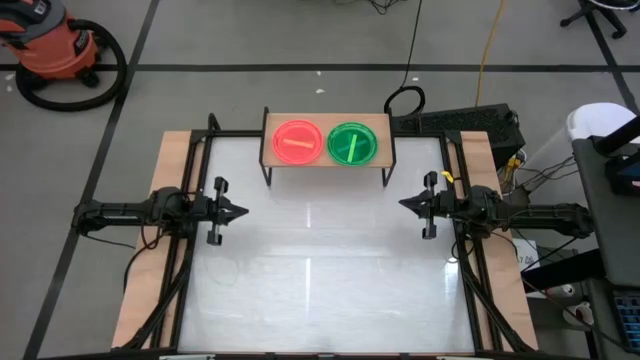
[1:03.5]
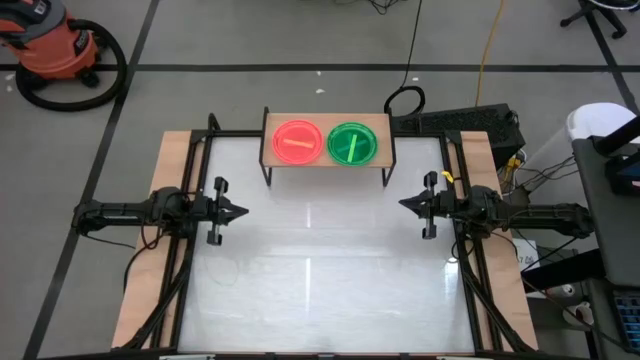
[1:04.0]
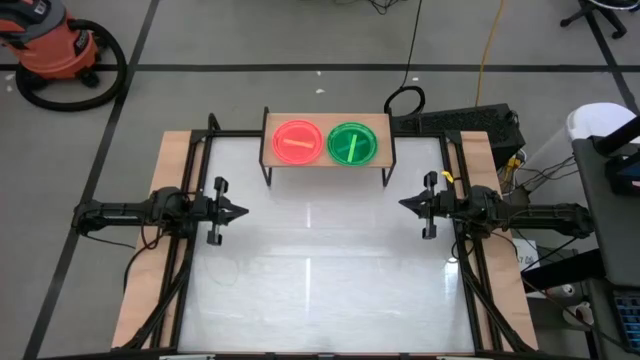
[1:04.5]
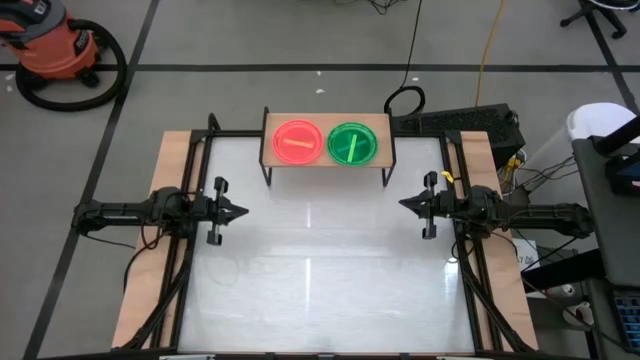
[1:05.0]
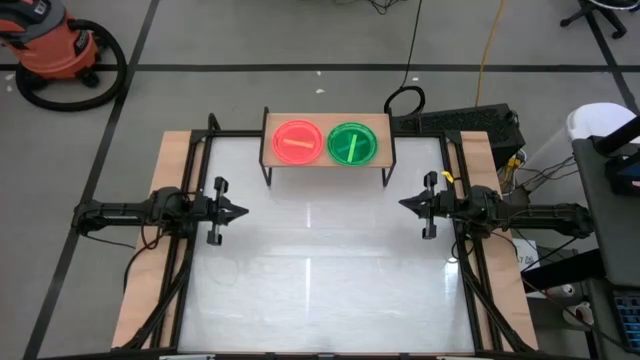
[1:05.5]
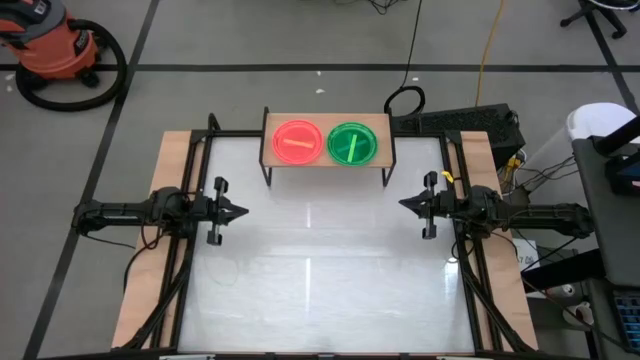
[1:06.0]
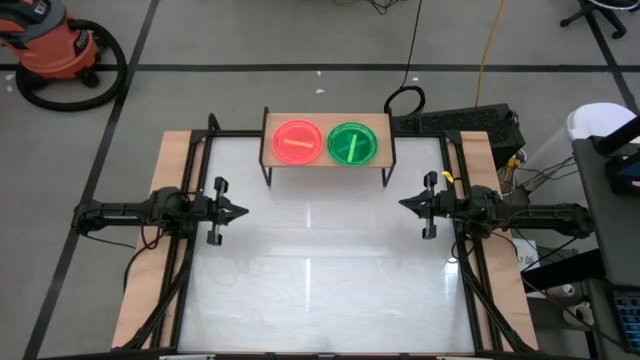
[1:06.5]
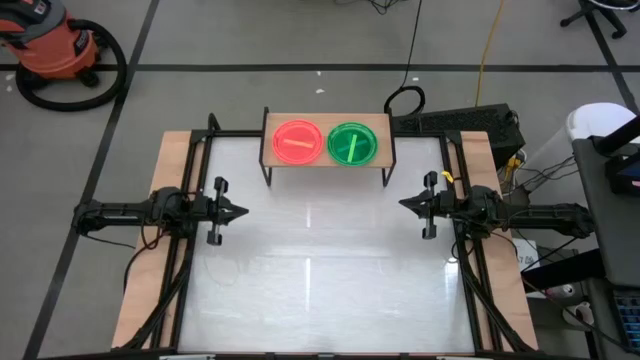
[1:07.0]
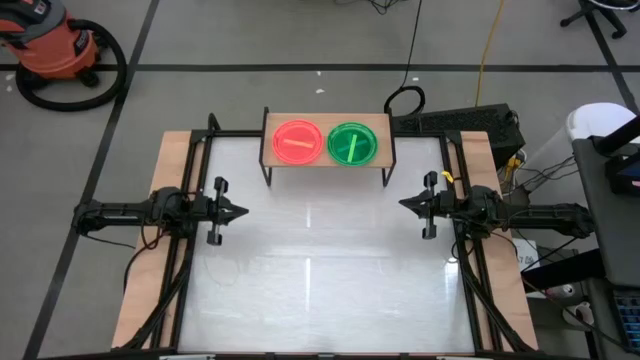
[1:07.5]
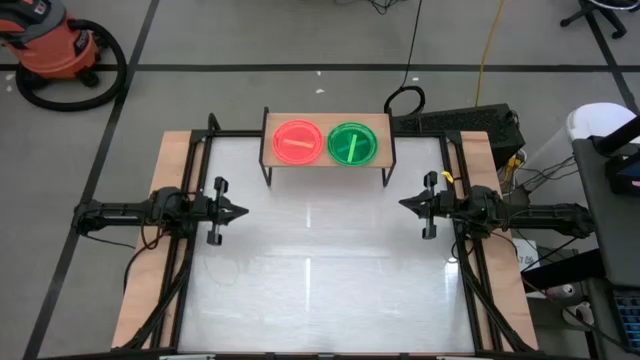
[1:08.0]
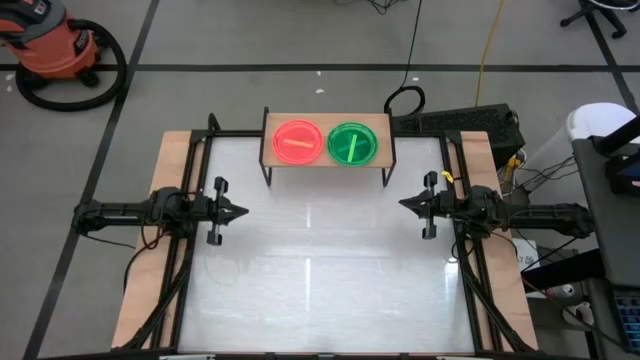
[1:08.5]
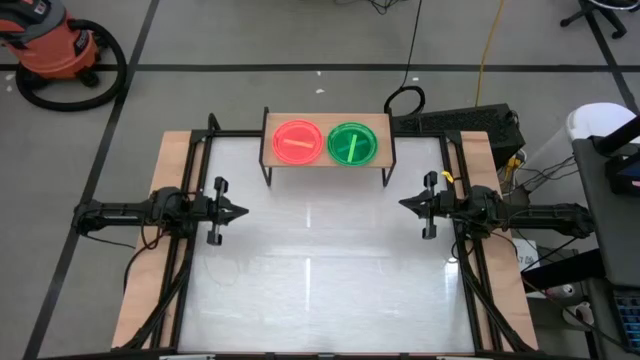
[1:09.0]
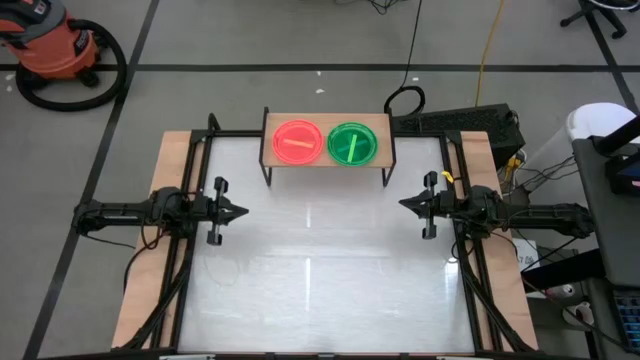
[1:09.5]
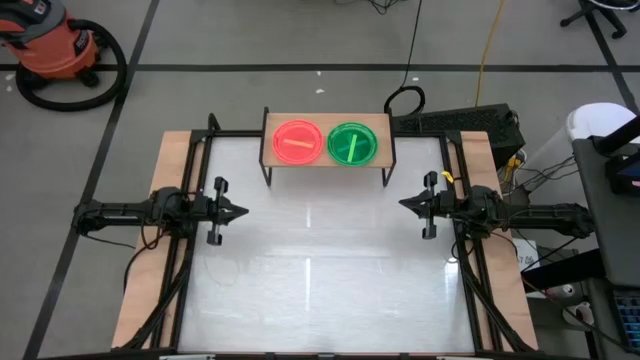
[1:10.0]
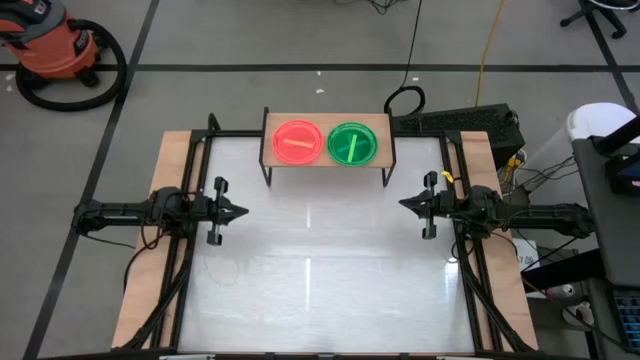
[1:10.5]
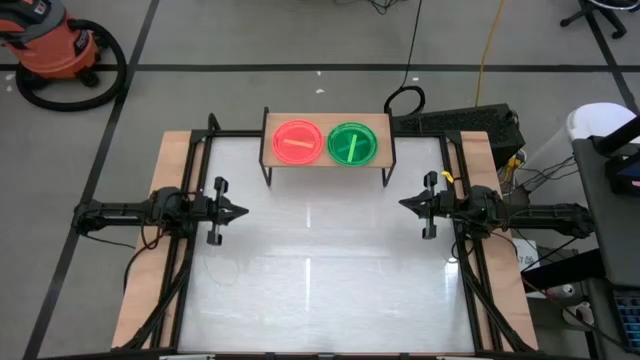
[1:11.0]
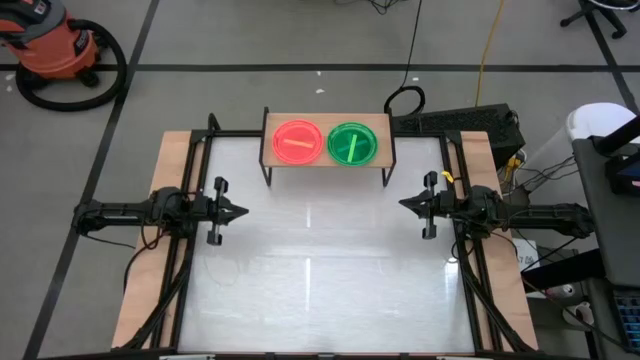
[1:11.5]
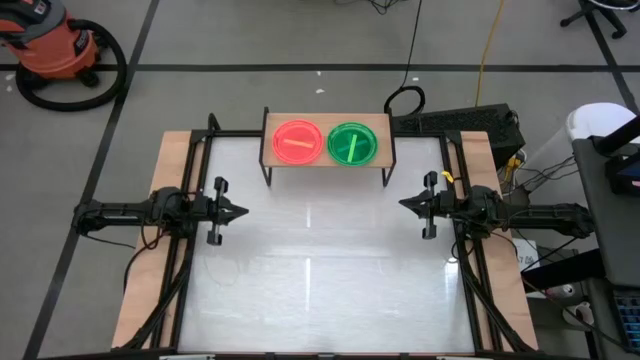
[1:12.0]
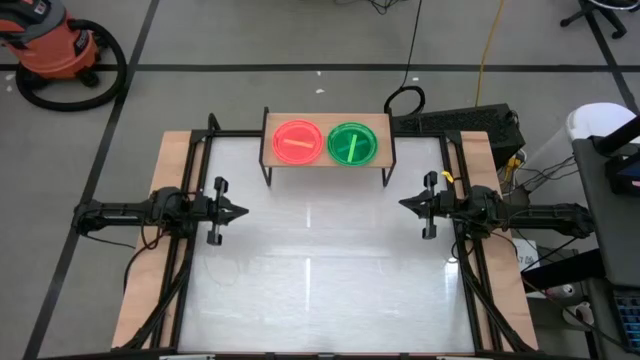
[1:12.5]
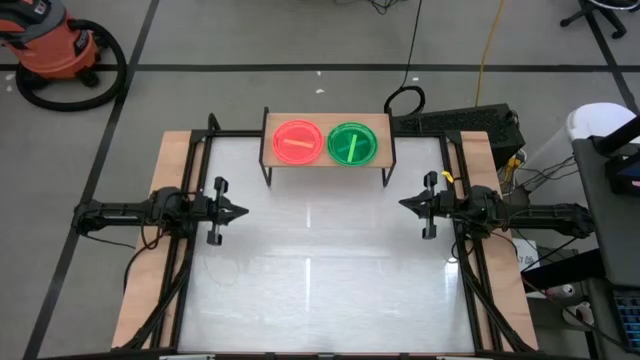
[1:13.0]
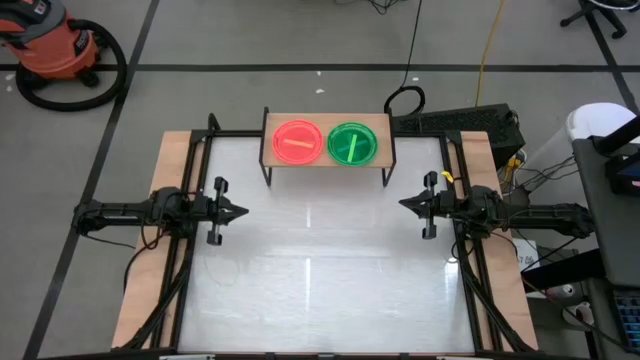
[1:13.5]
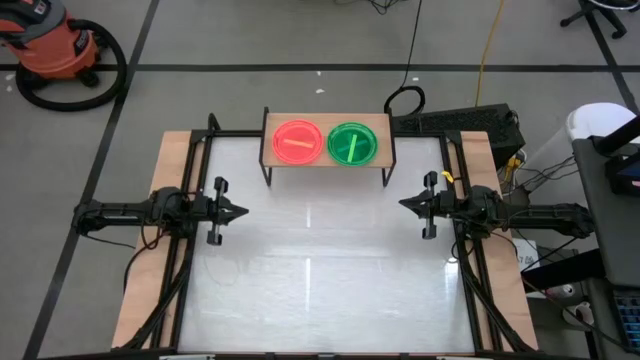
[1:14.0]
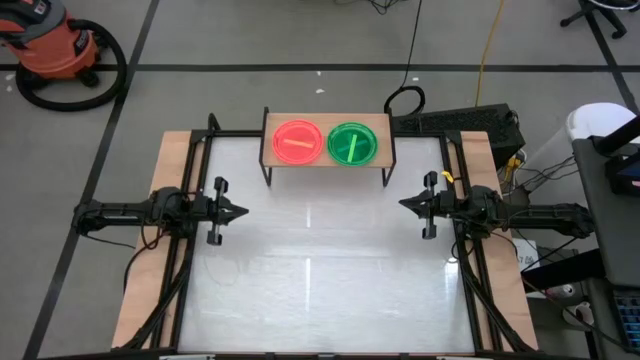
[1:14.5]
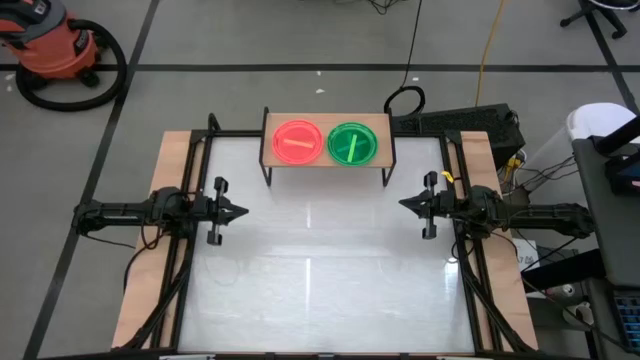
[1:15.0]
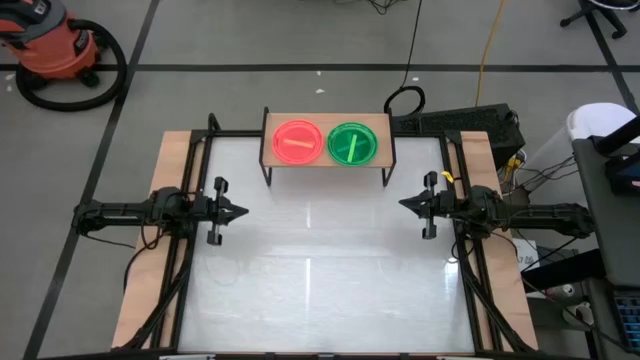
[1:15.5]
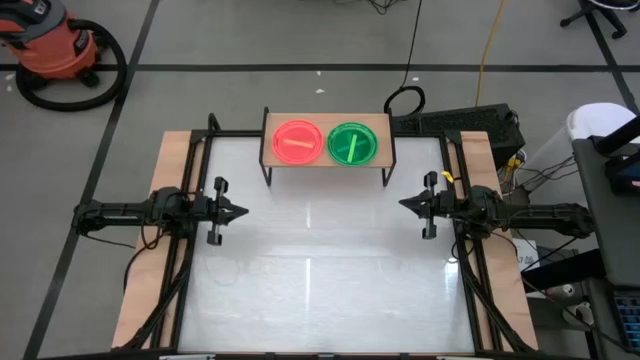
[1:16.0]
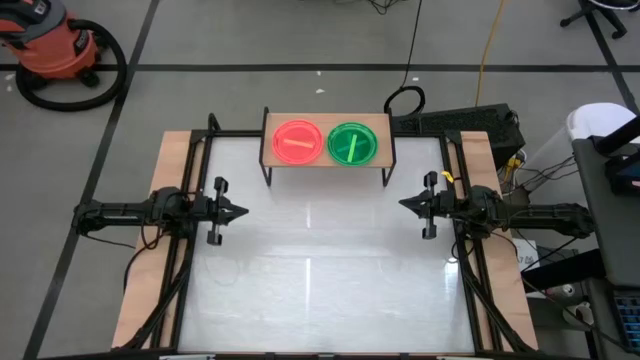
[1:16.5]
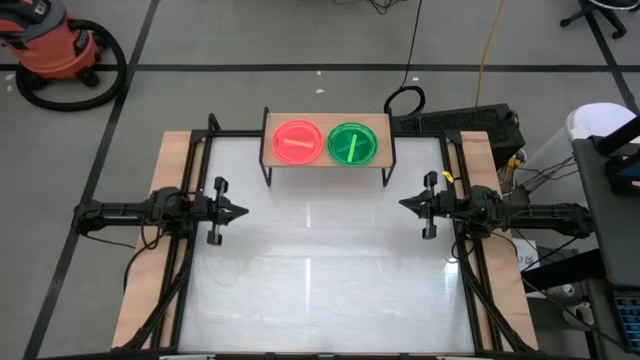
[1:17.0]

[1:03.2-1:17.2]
Task: Place and stack plates onto a shelf
Return to Home Position

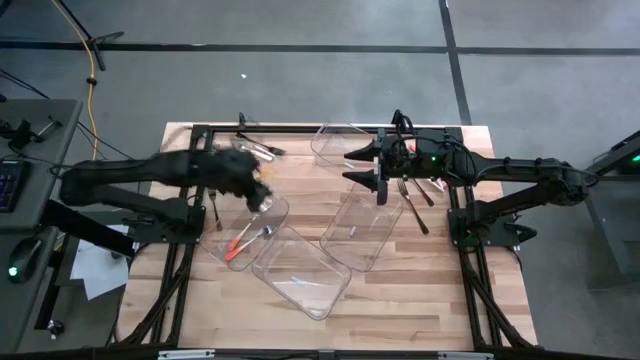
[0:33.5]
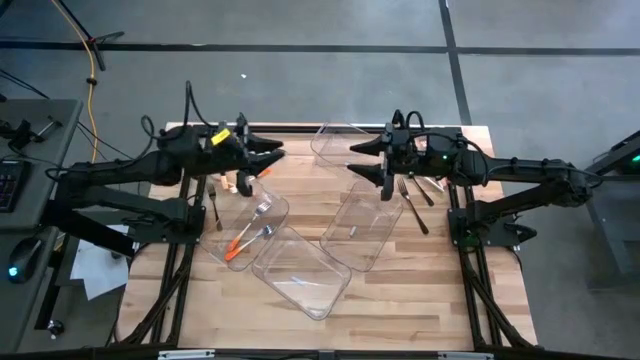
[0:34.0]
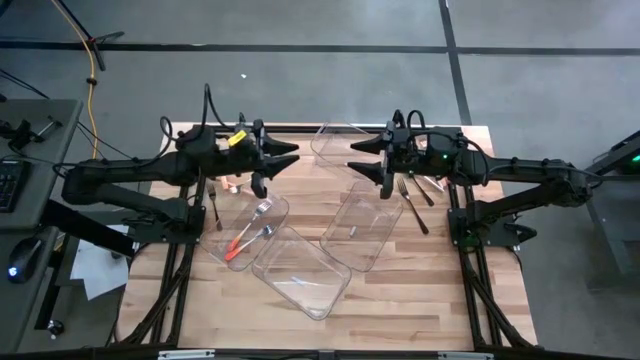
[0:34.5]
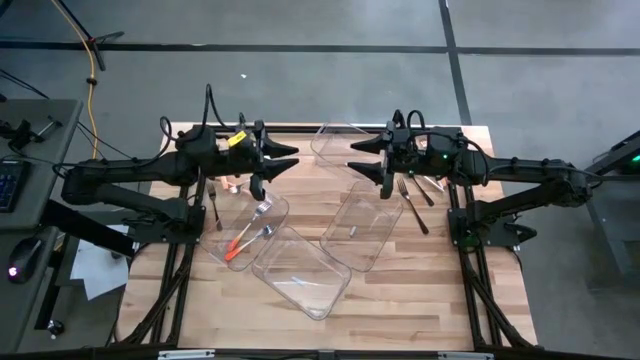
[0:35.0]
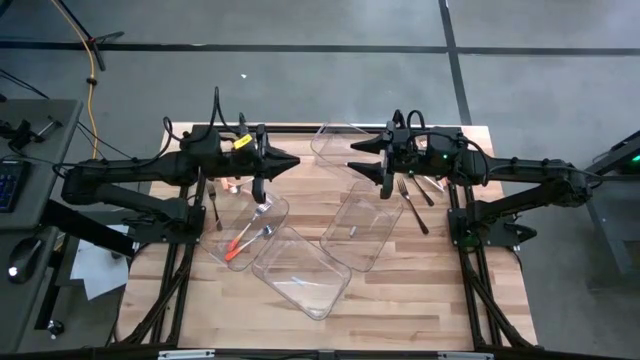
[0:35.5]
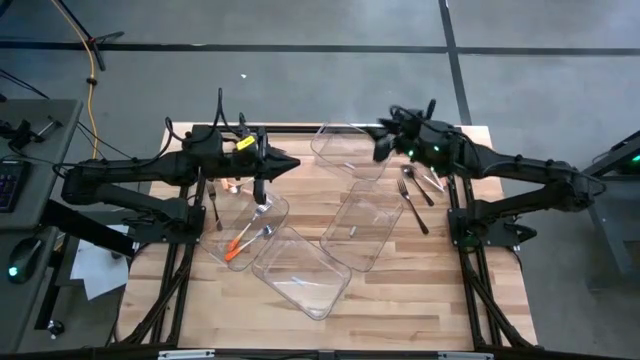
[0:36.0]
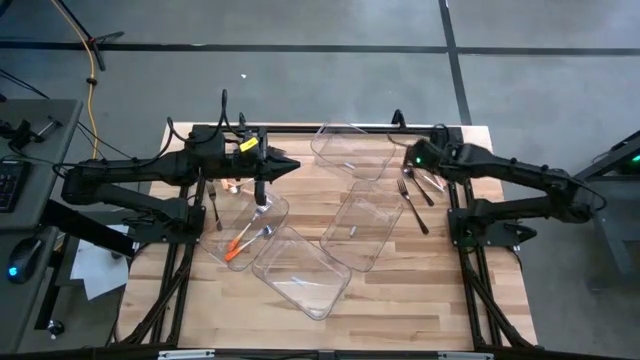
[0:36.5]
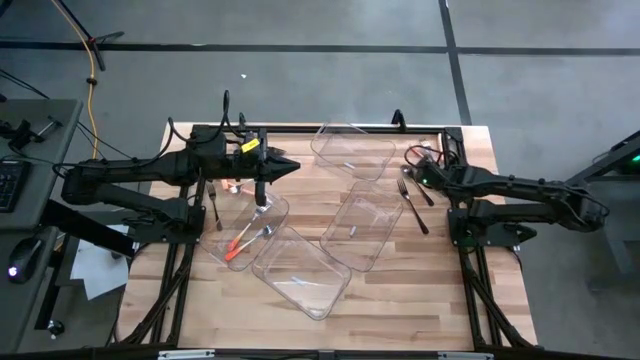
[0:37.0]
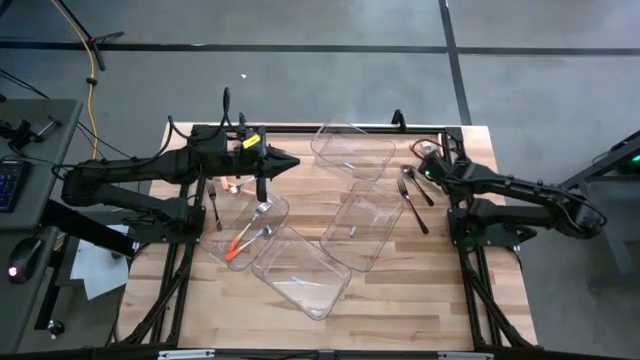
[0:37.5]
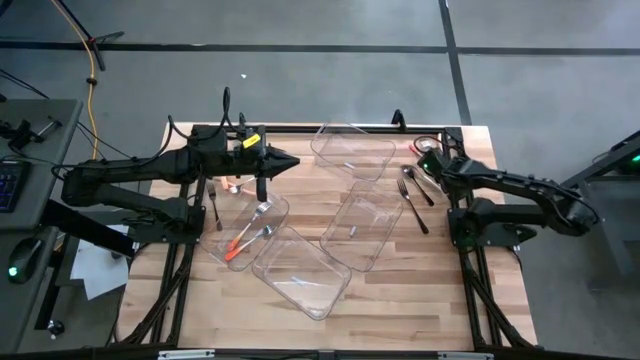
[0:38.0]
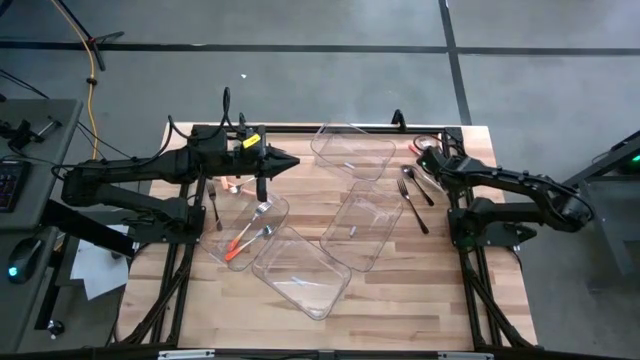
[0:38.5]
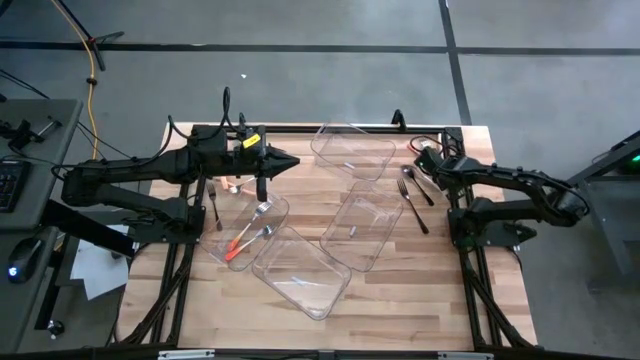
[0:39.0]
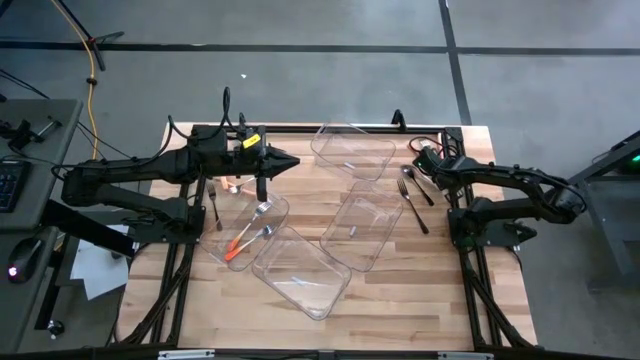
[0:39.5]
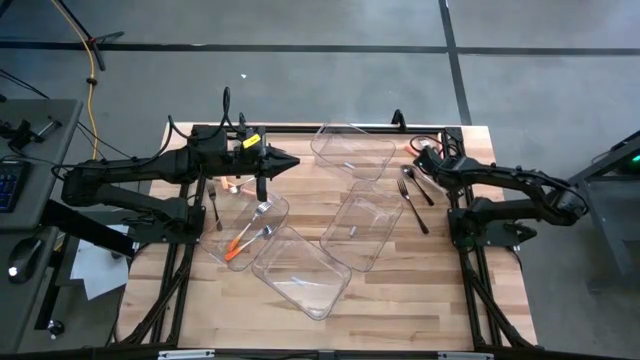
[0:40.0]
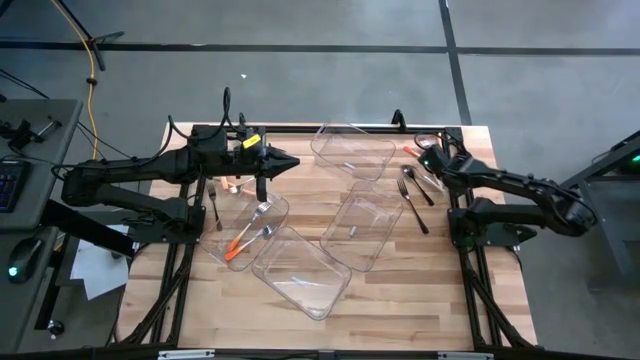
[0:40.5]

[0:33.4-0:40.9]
Task: Sort silverware by color (type)
Put the orange fork into the middle left transparent bin
